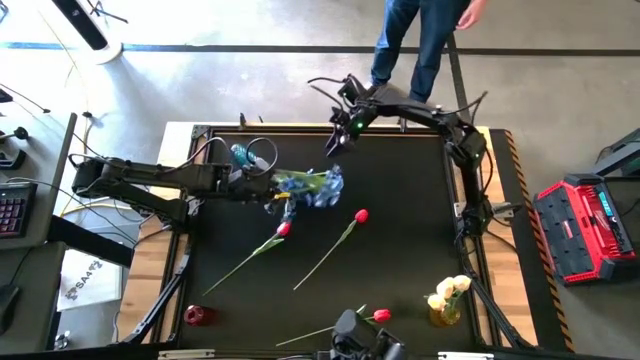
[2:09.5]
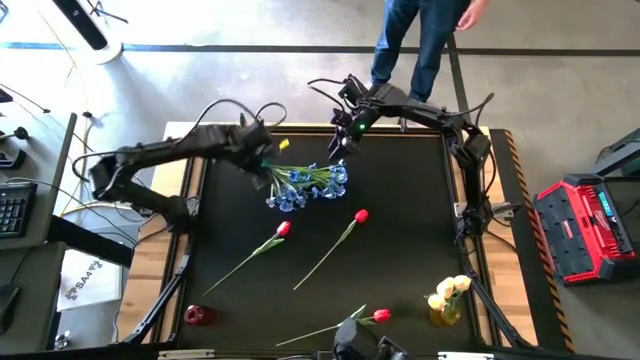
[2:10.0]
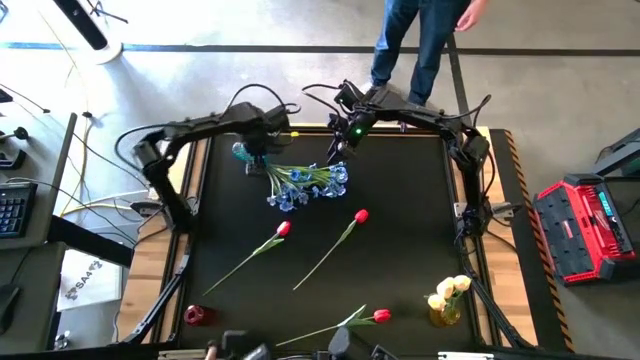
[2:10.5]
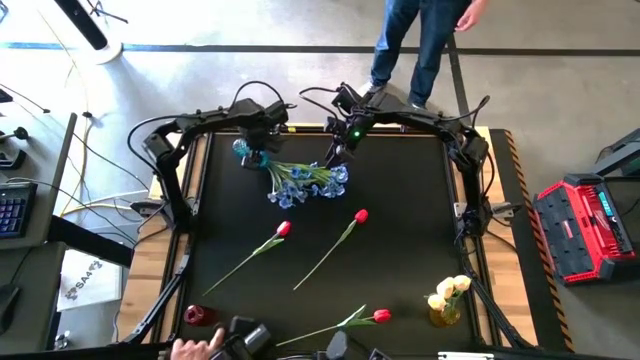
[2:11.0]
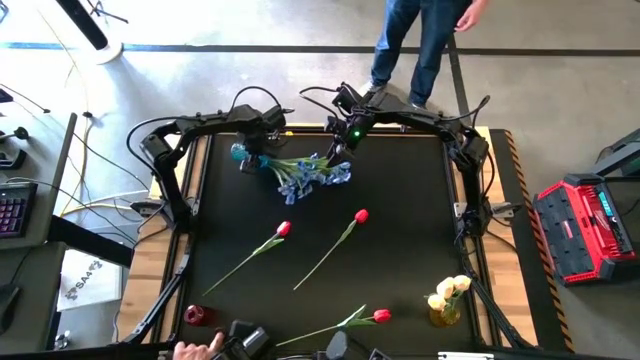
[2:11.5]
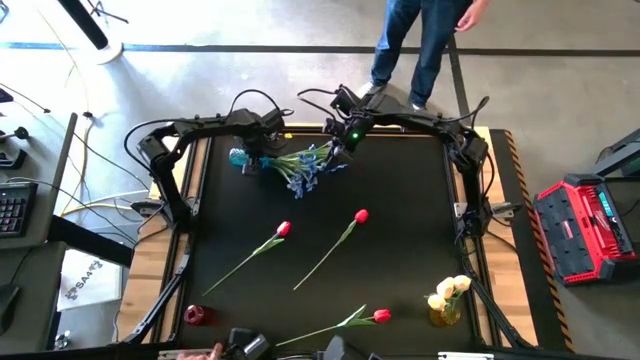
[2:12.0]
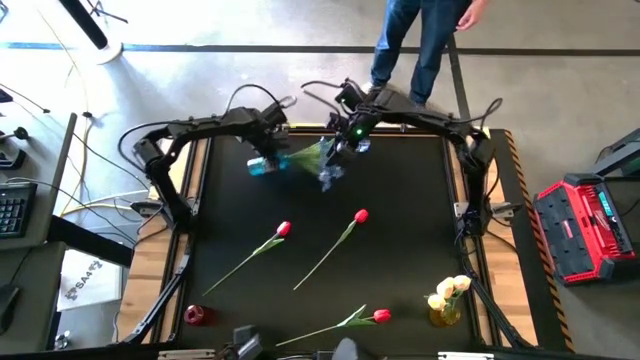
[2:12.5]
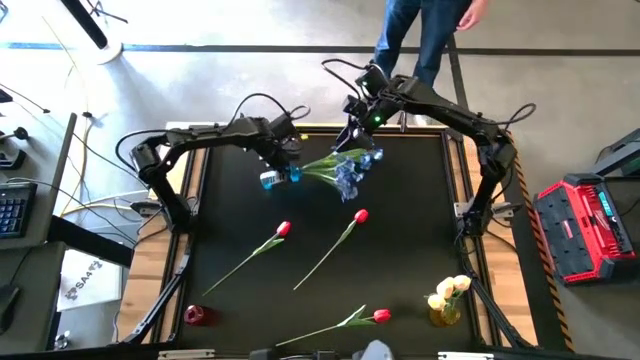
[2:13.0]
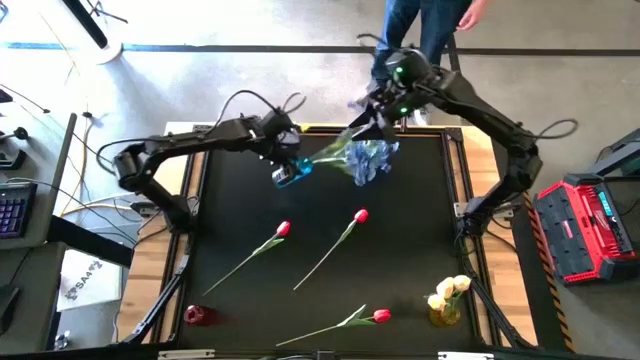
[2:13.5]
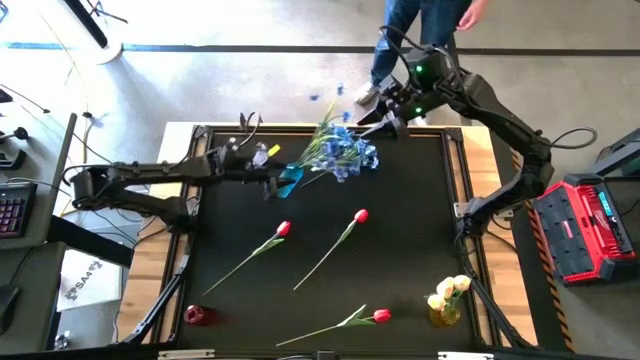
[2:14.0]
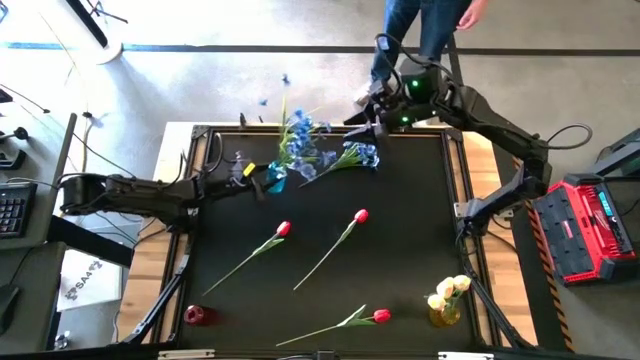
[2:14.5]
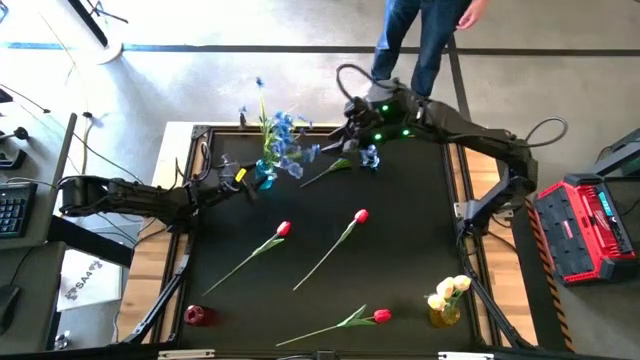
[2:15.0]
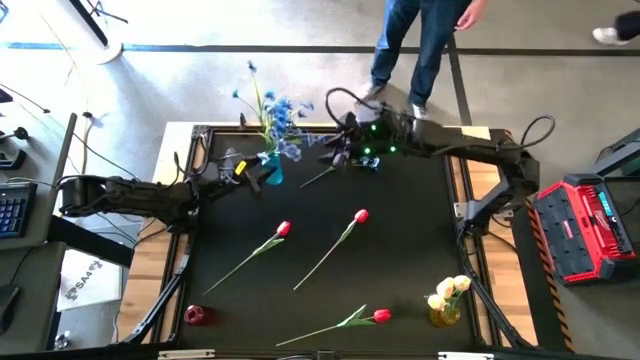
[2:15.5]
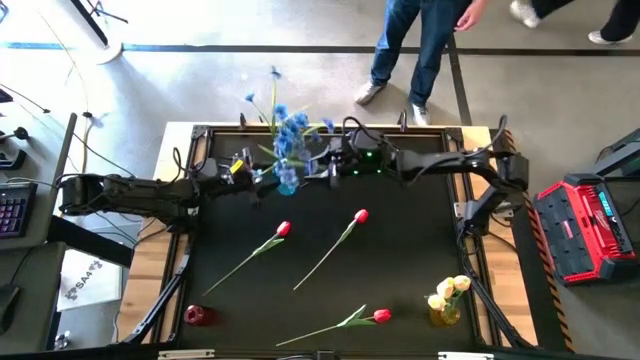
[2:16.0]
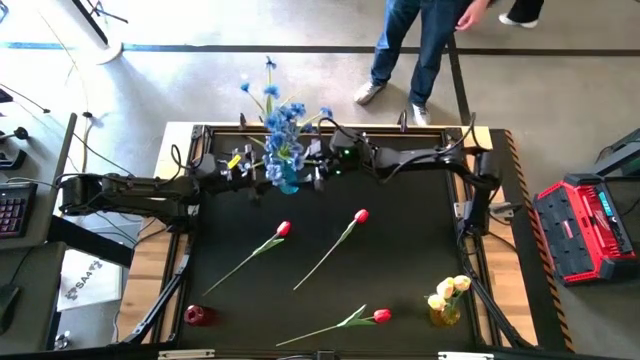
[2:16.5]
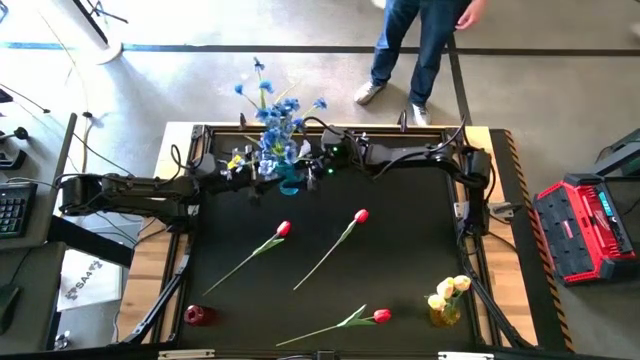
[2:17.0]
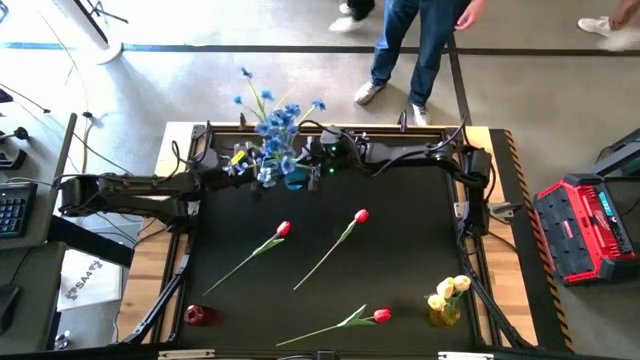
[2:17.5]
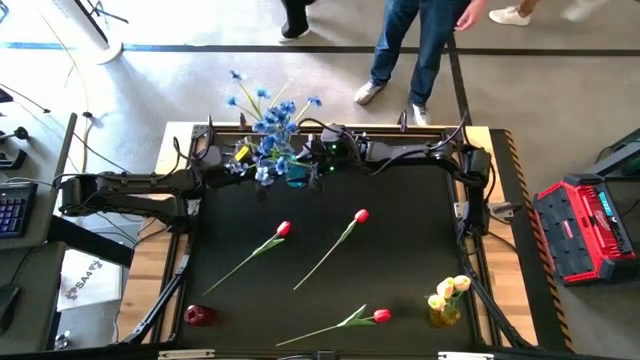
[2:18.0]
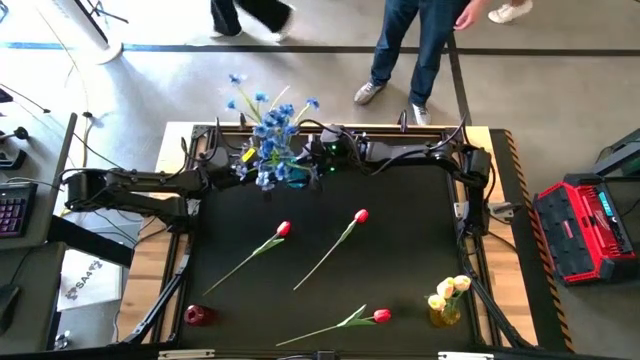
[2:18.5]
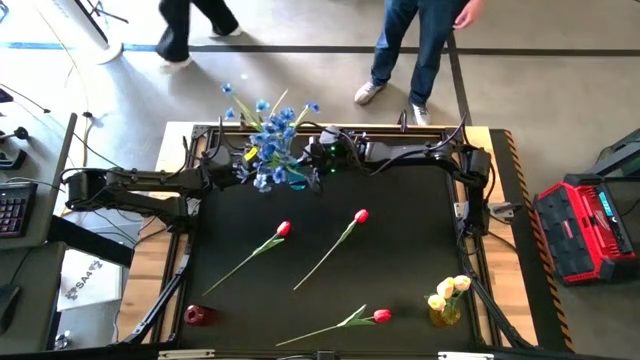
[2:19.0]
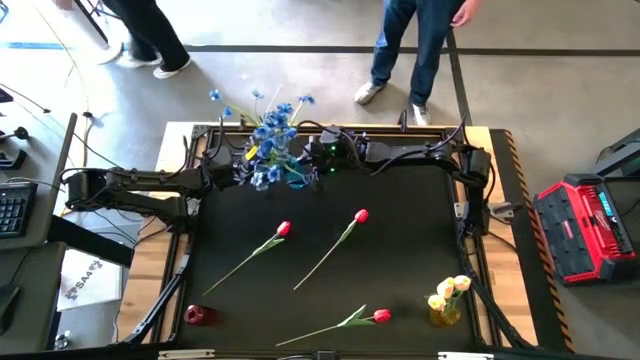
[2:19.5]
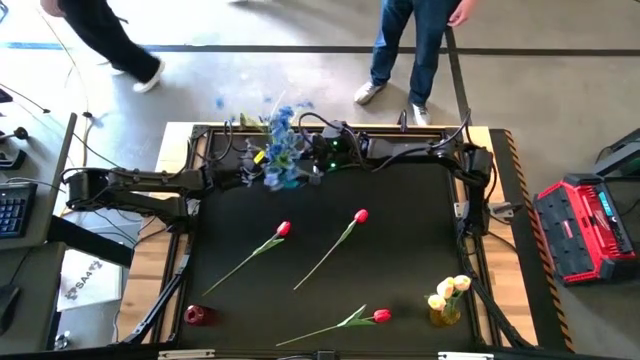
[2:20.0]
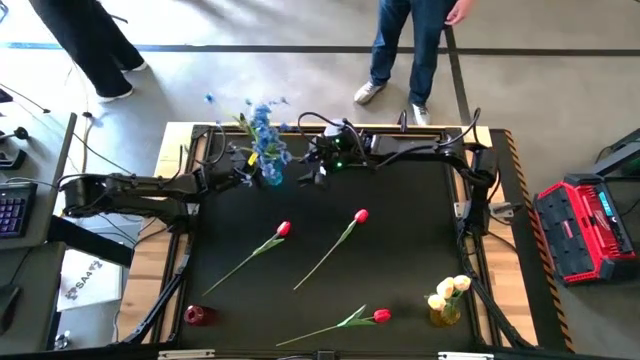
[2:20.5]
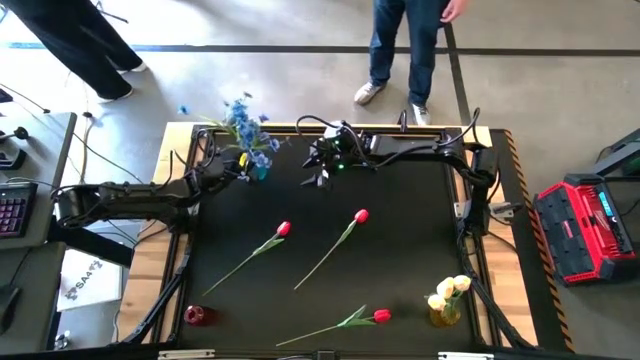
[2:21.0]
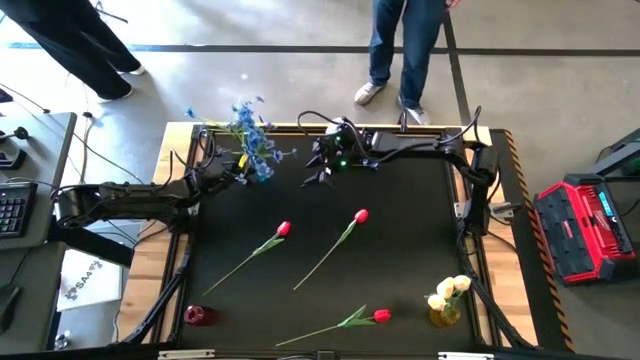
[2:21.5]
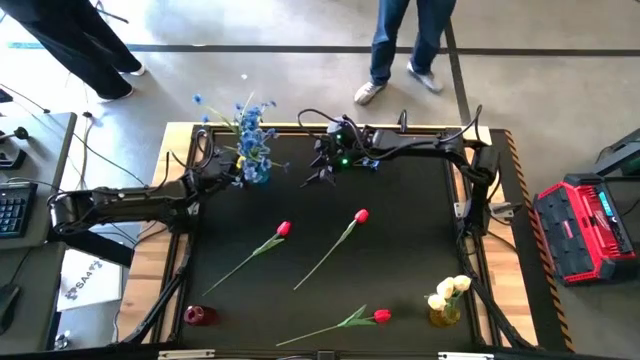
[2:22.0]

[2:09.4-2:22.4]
Task: Sort flowers into vase by color
Adjust the blue vase on the top left of the table

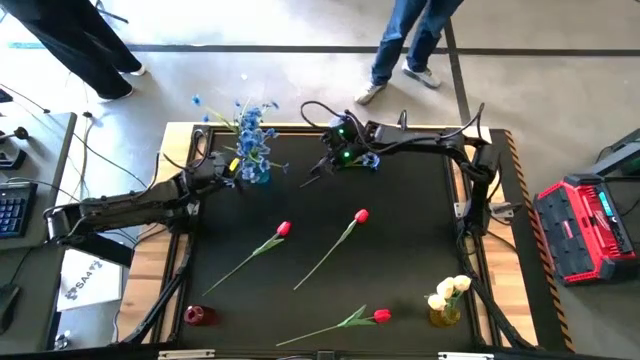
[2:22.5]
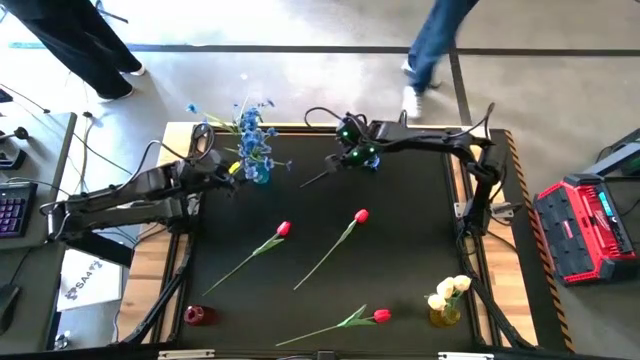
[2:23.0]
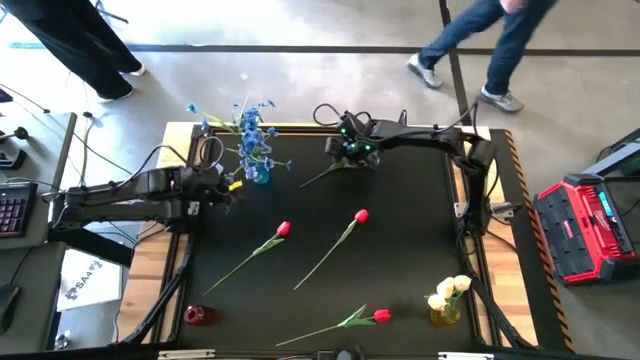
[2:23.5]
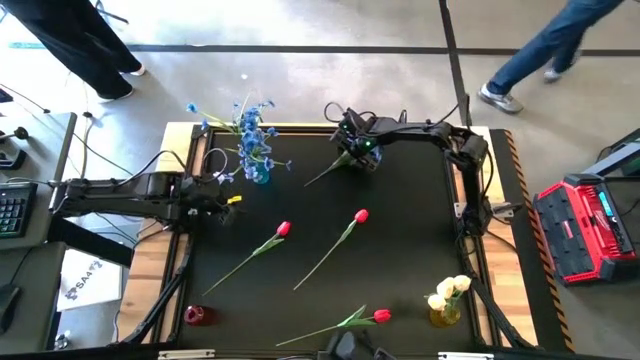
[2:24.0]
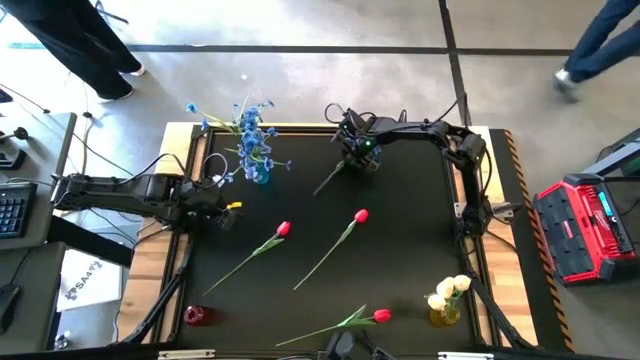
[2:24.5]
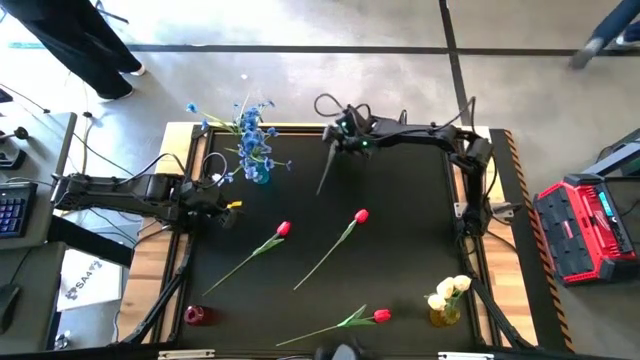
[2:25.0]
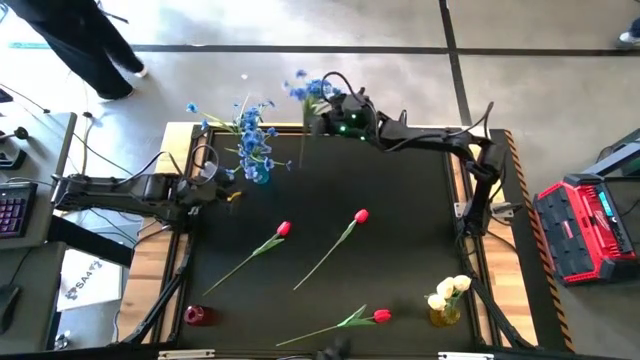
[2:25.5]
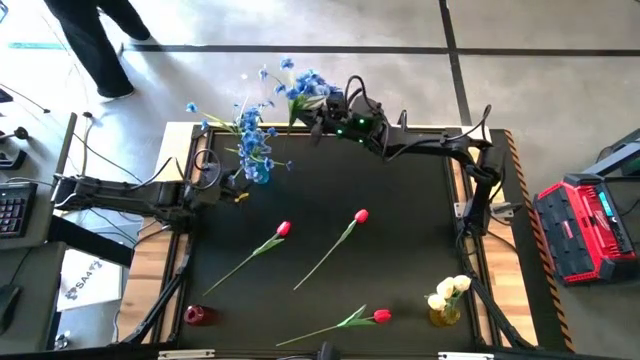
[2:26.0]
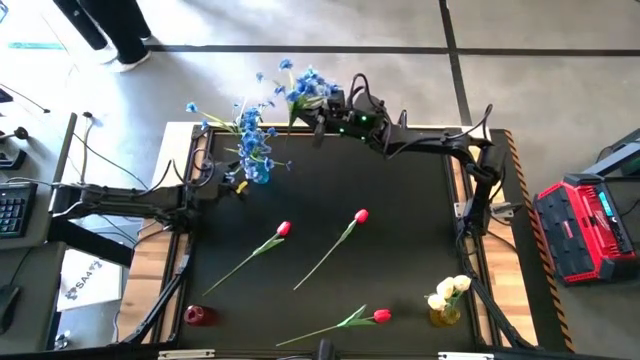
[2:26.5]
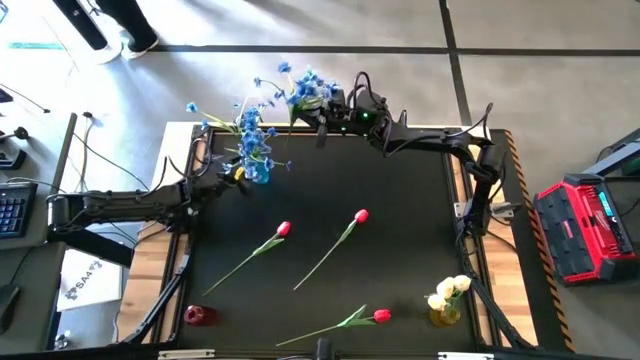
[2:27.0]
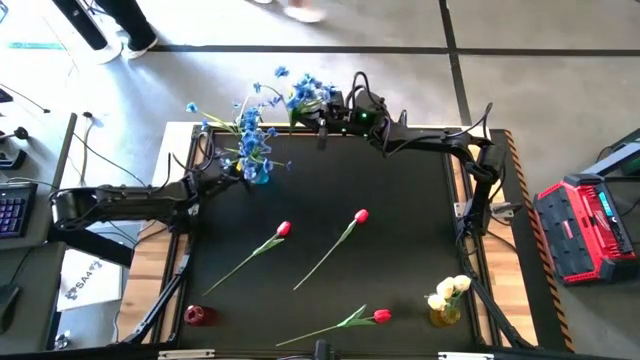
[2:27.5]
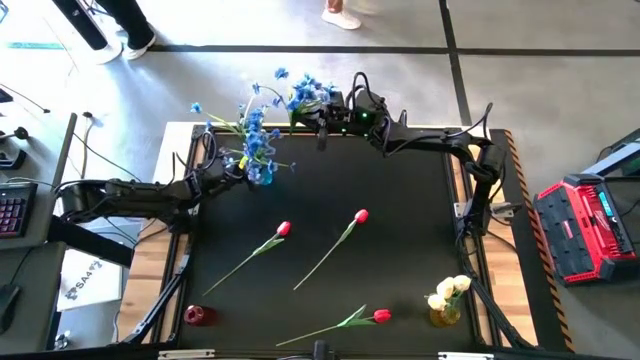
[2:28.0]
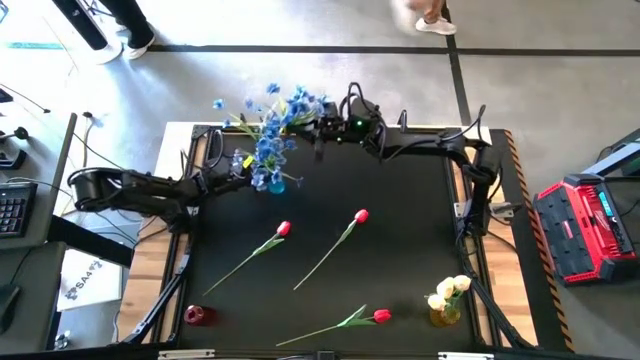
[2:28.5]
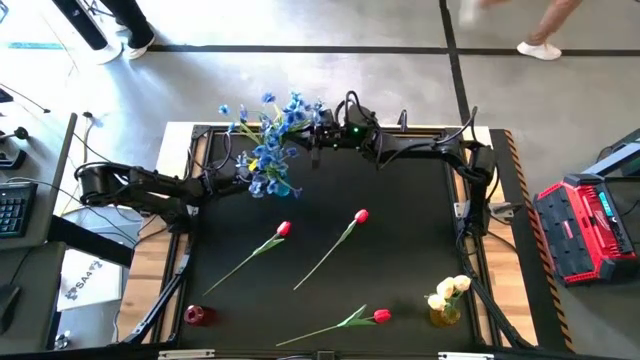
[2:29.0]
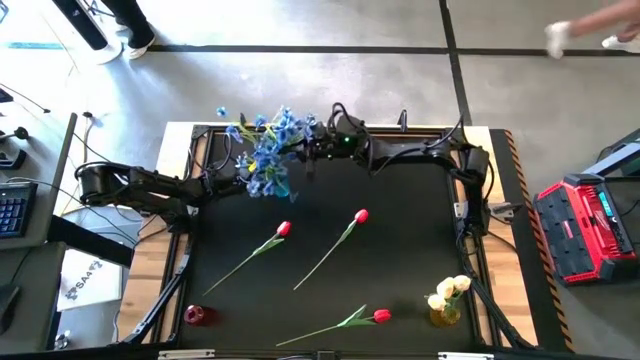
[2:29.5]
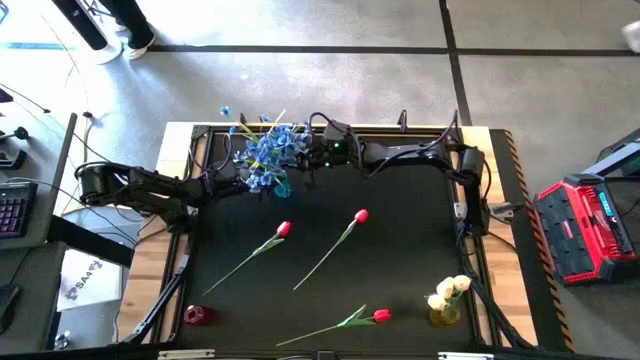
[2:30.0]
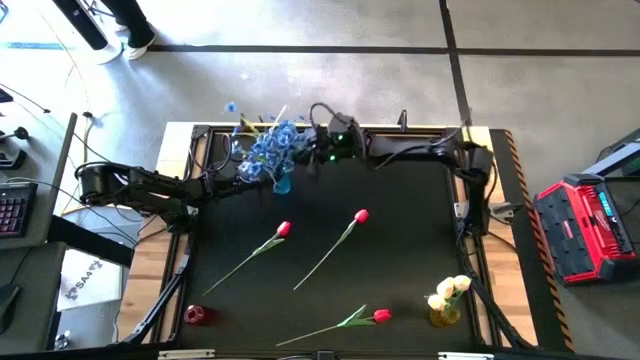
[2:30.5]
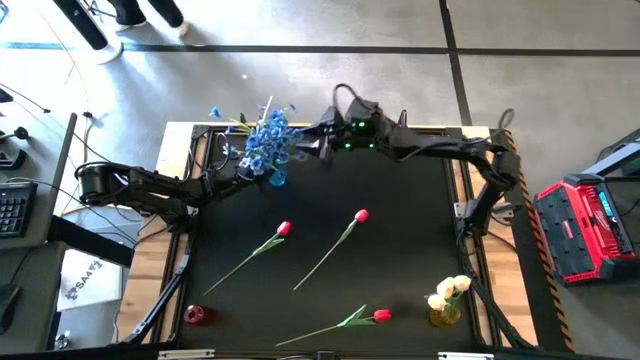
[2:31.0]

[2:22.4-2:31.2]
Put the blue flowers into the blue vase
